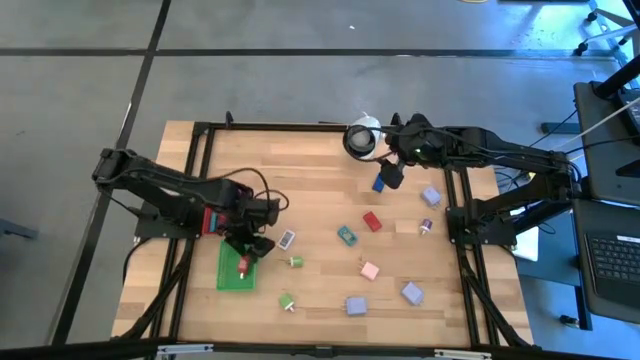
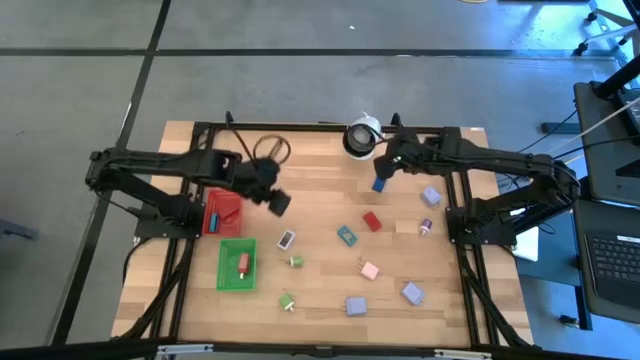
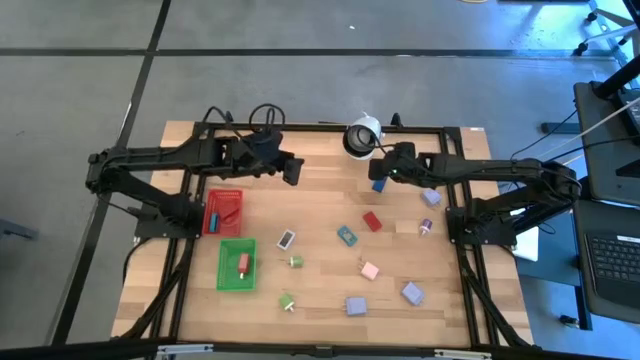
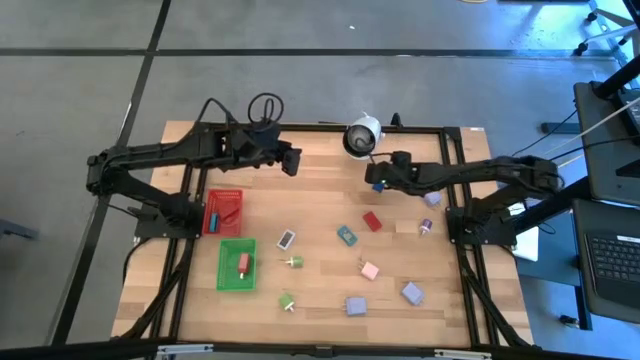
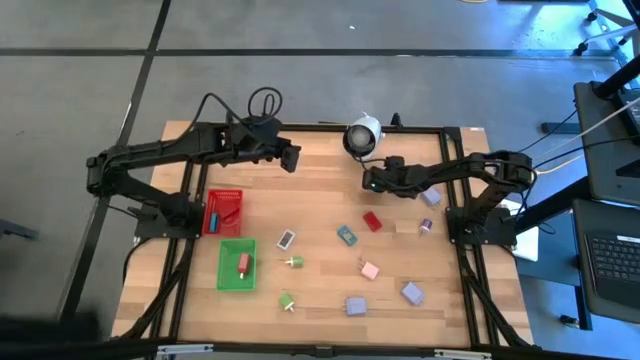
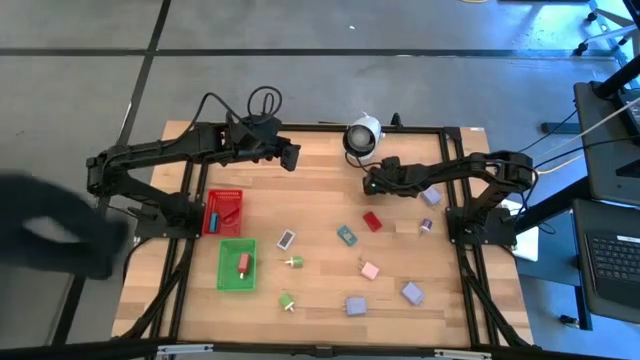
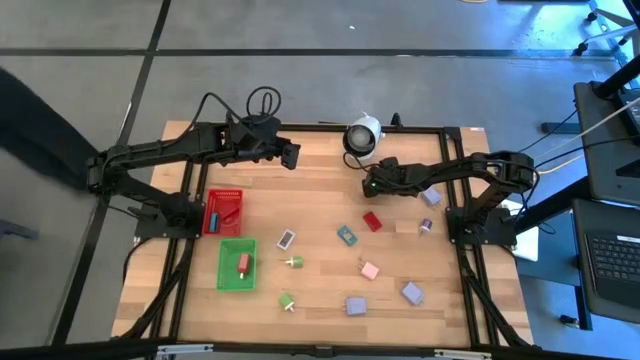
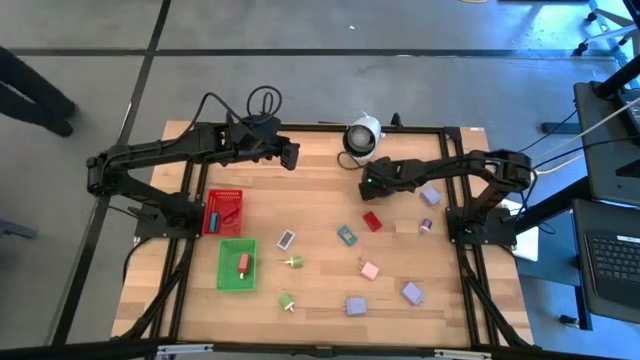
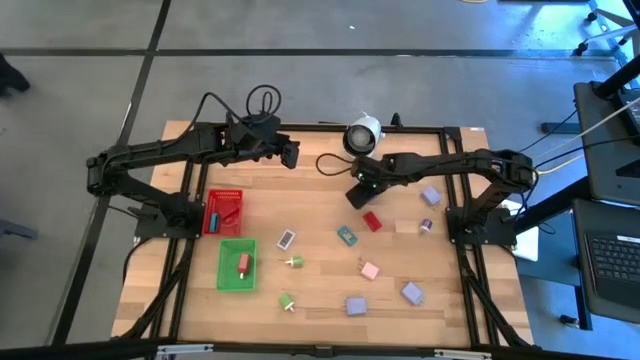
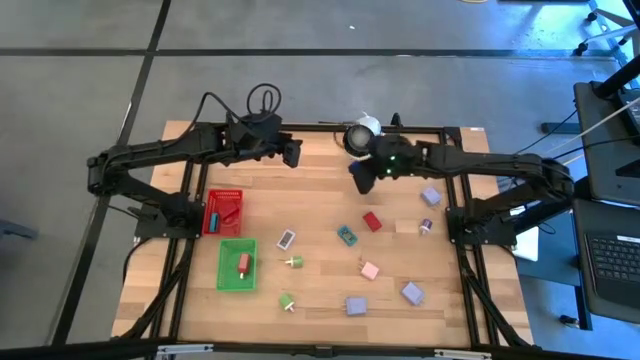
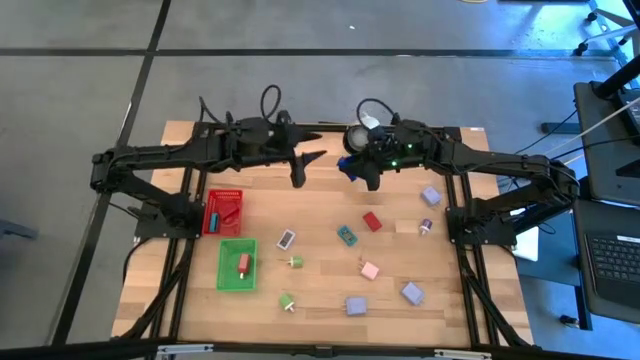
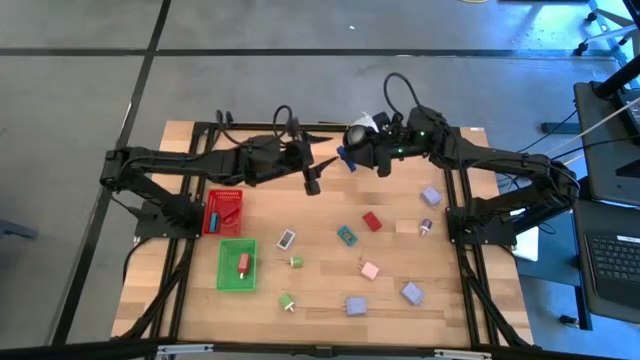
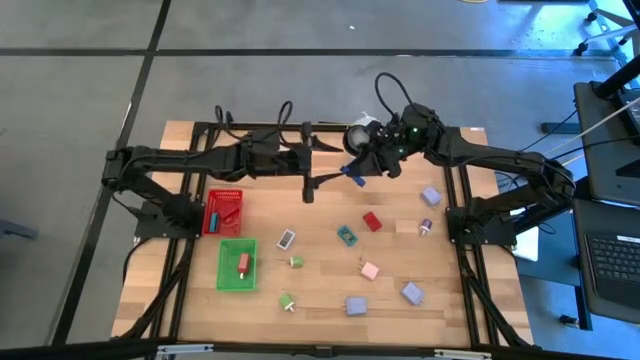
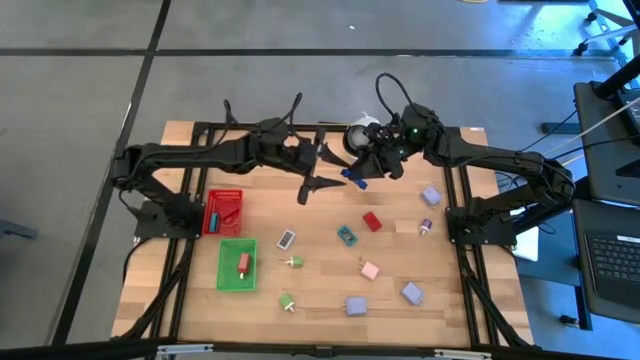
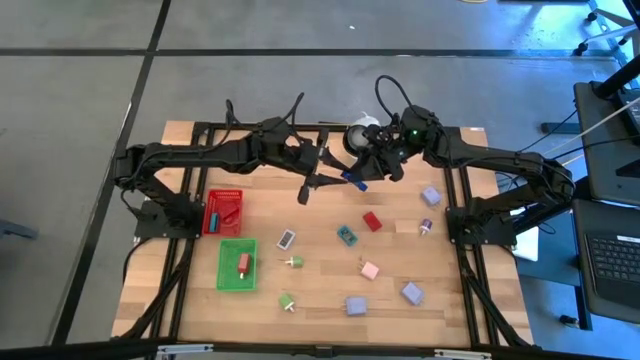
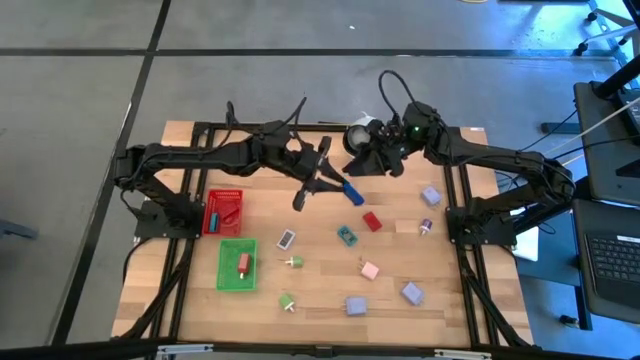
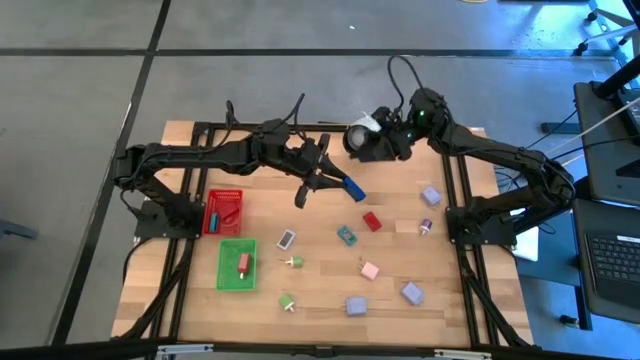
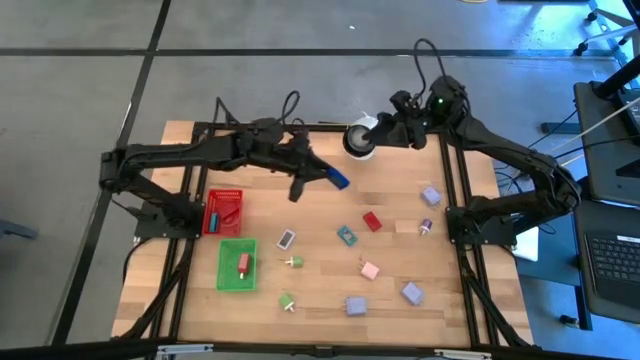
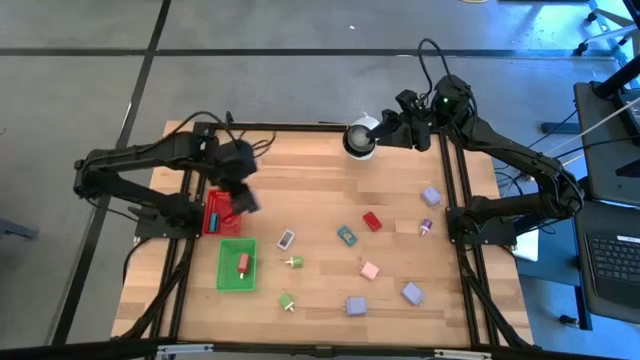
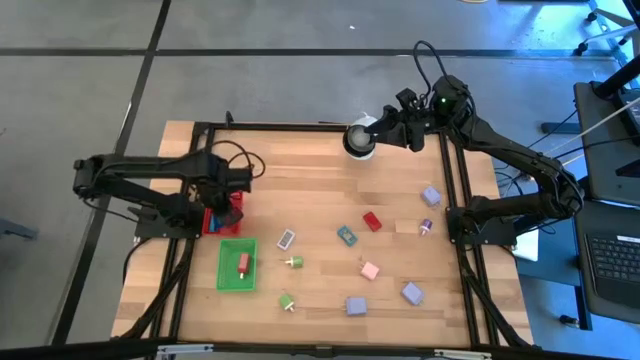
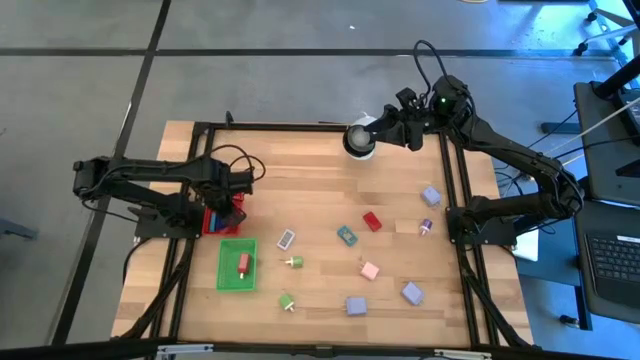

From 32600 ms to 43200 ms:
Task: Pick & Place Office items
Put the blue digital timer into the red bin

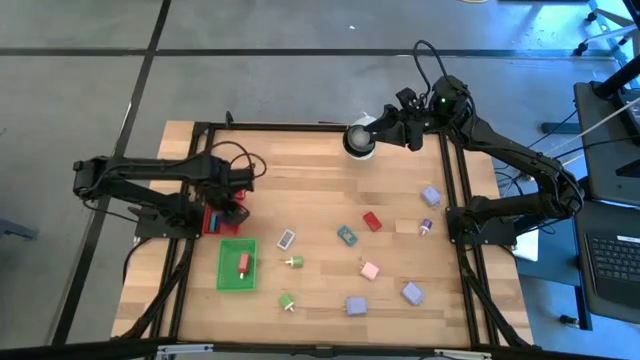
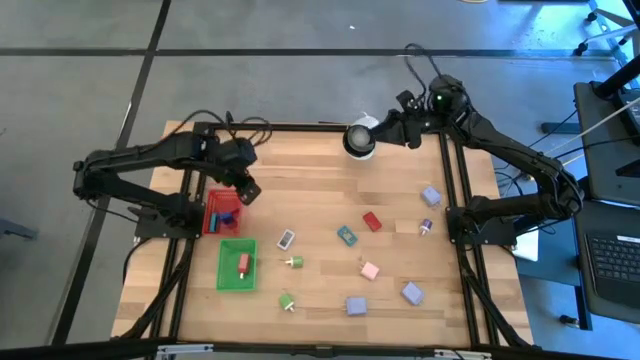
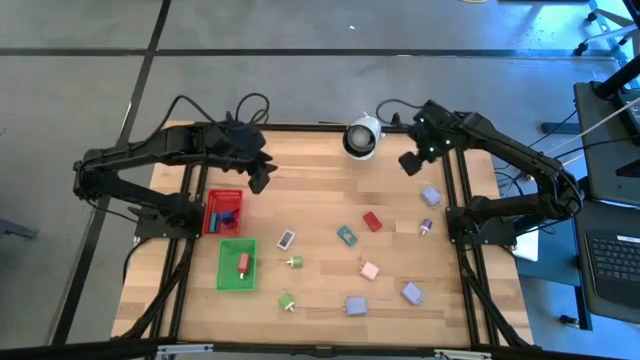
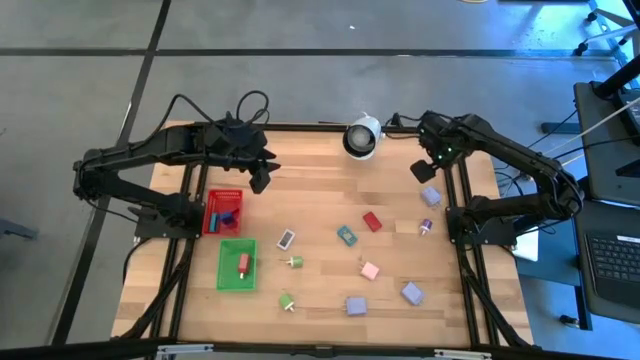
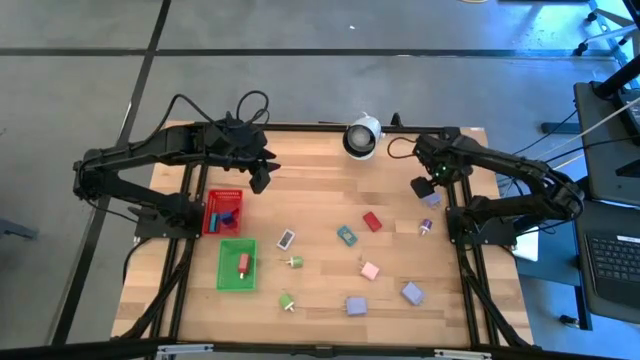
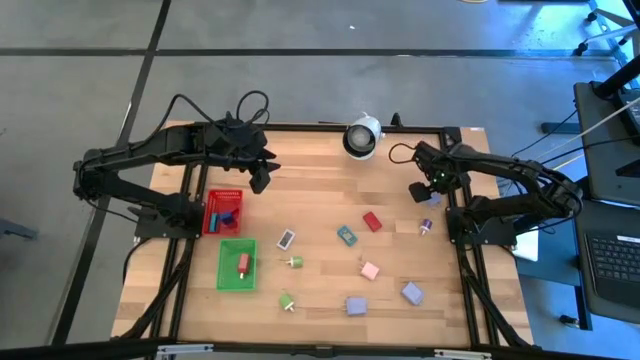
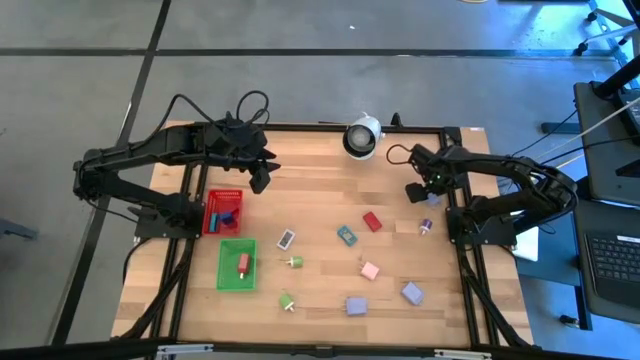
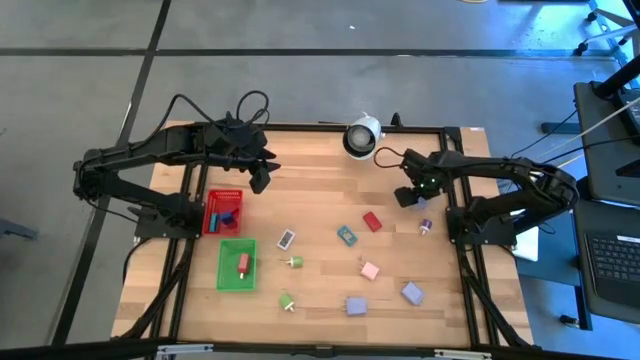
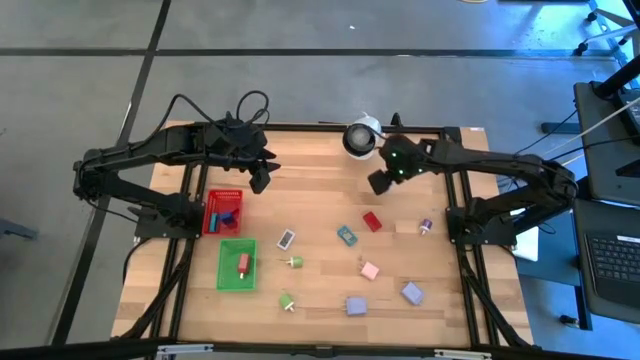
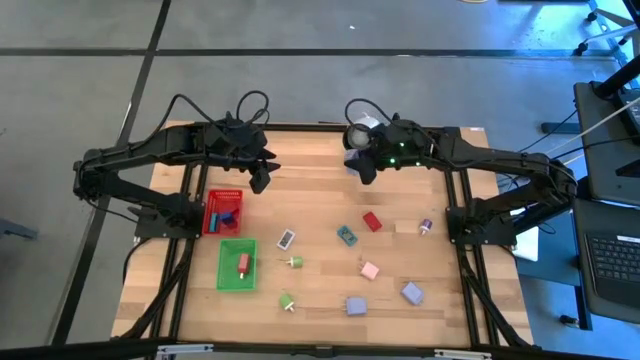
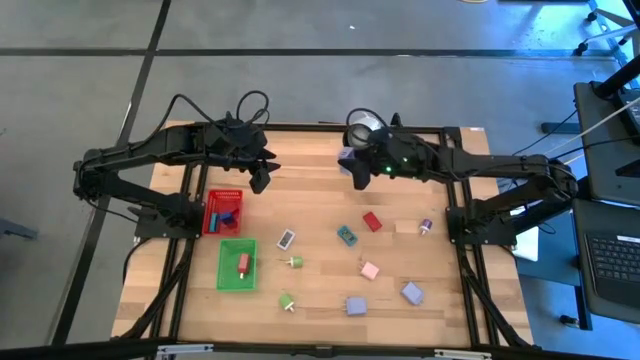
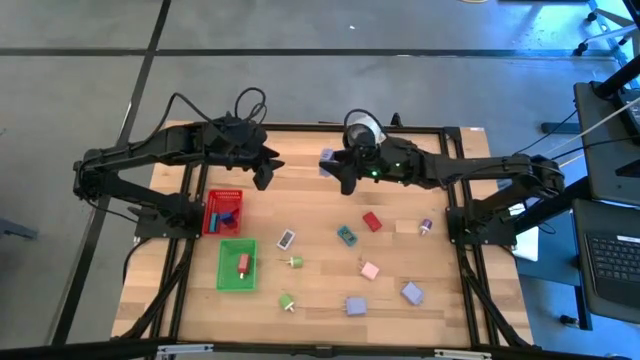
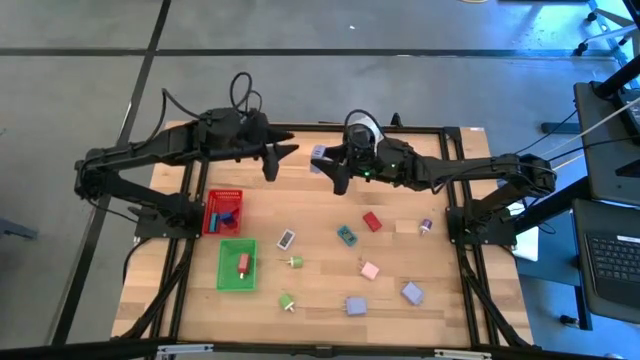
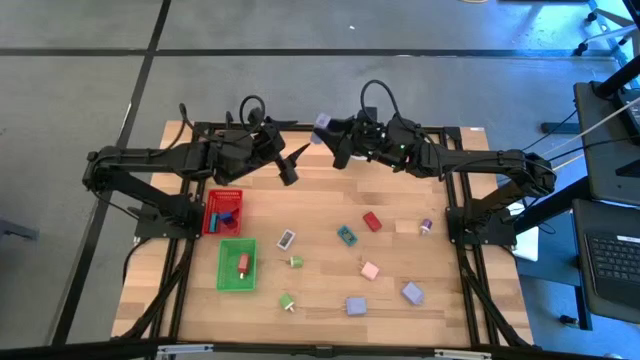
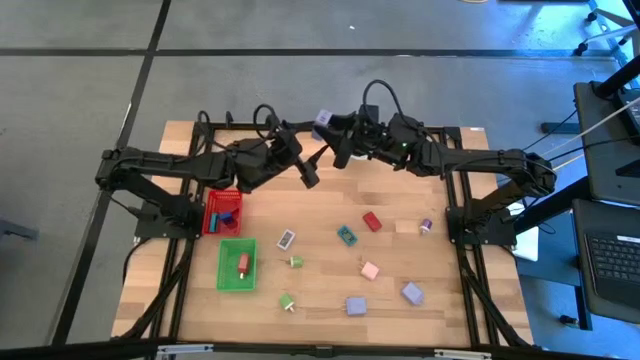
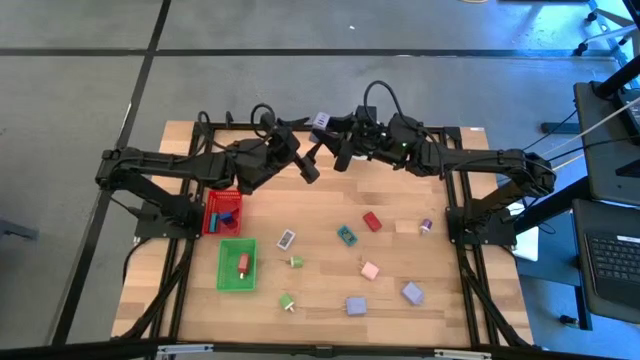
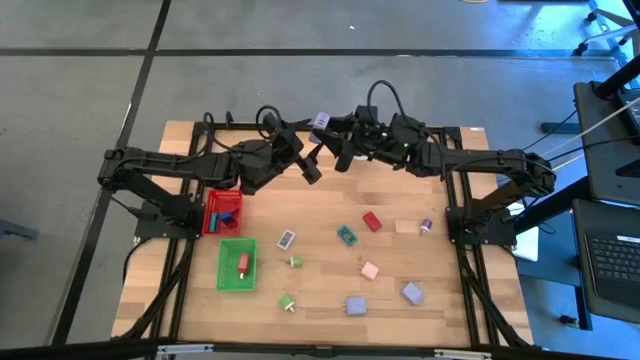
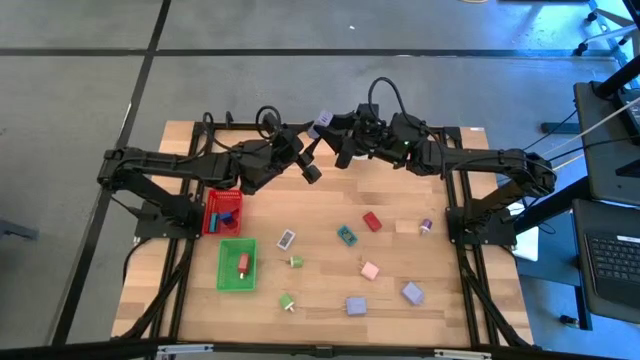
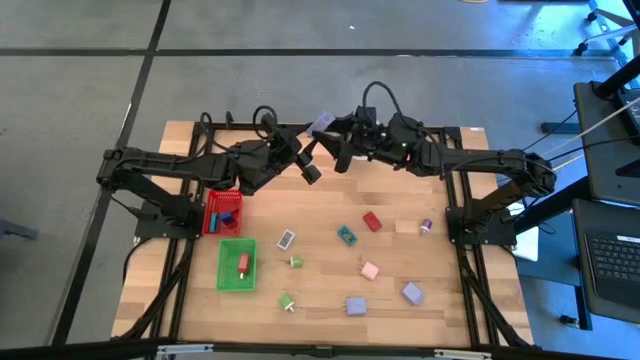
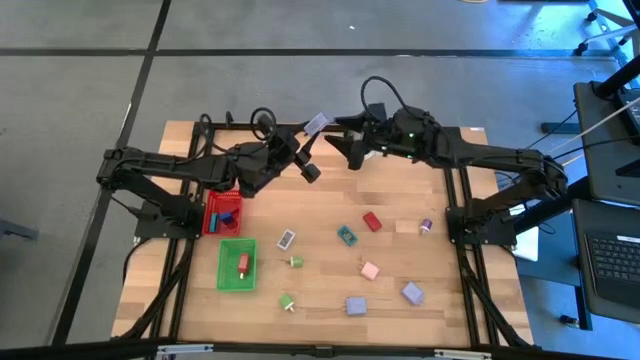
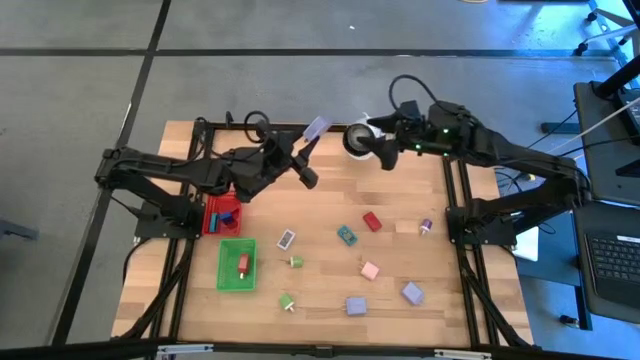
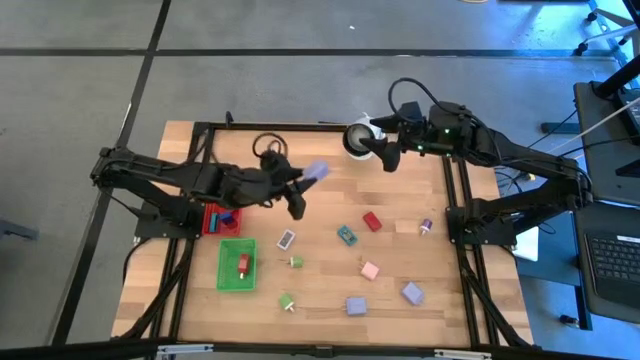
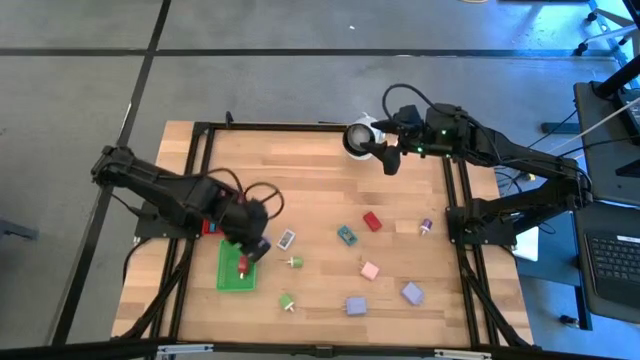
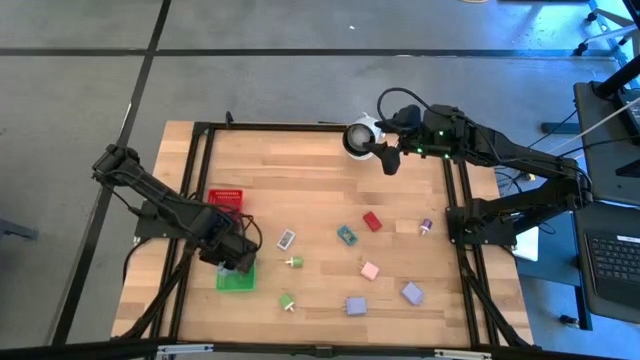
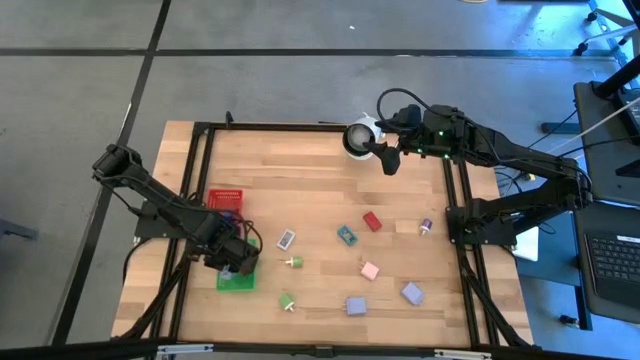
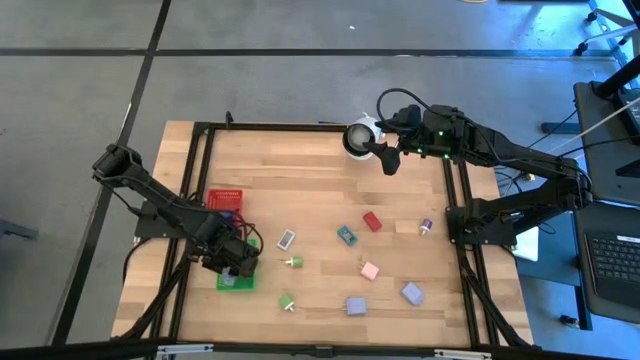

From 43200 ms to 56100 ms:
Put the top purple charger adapter into the green bin
